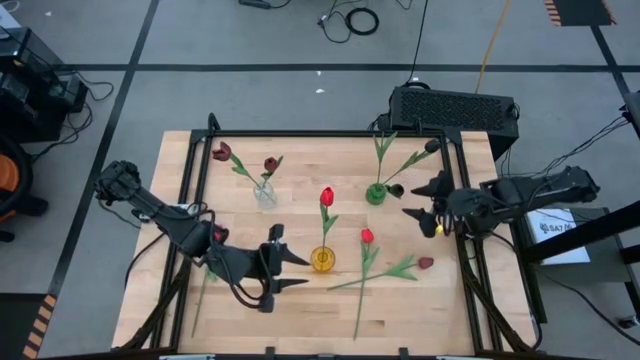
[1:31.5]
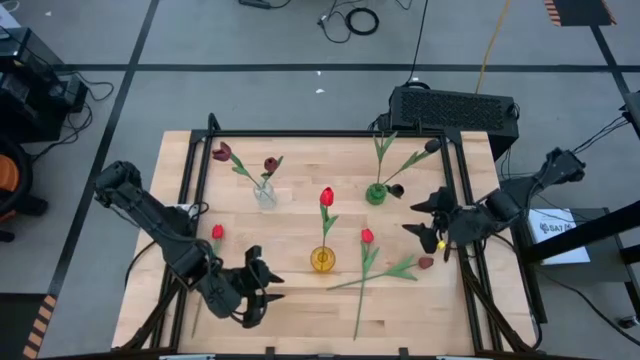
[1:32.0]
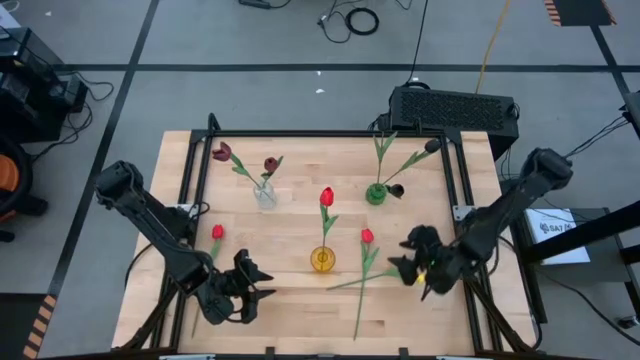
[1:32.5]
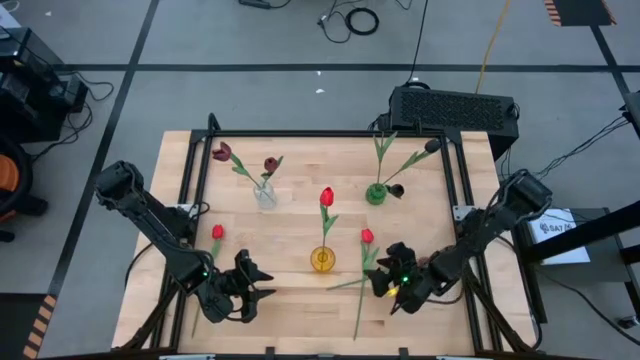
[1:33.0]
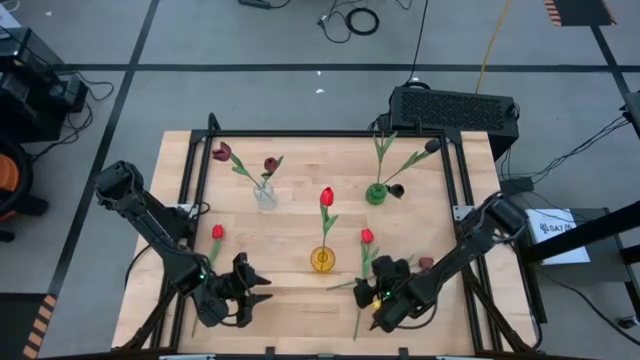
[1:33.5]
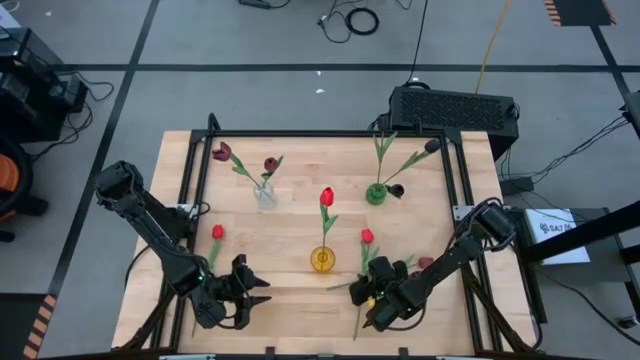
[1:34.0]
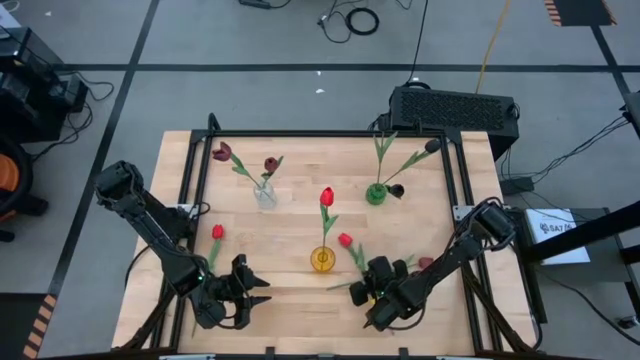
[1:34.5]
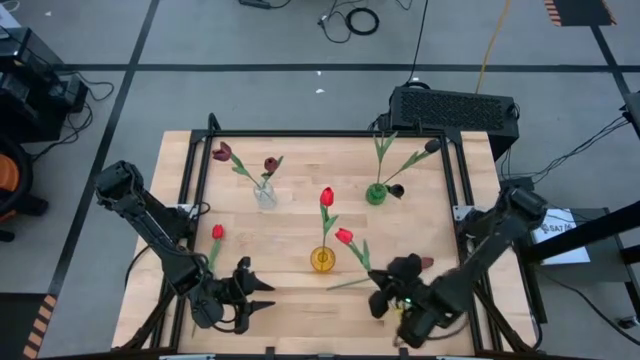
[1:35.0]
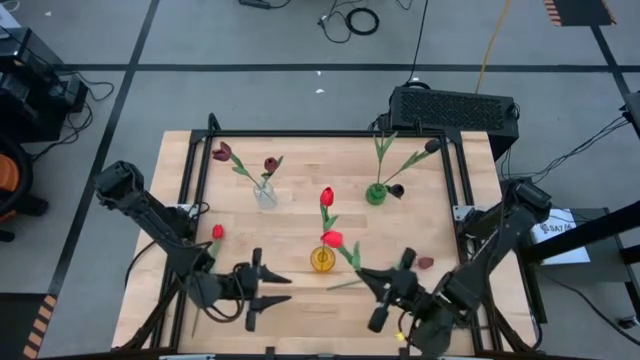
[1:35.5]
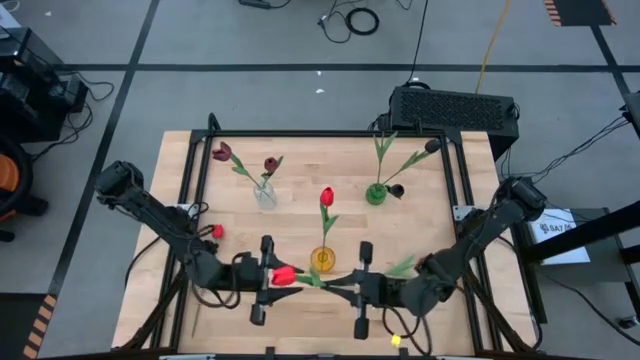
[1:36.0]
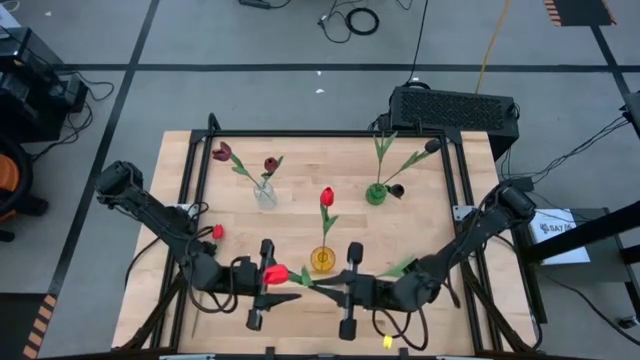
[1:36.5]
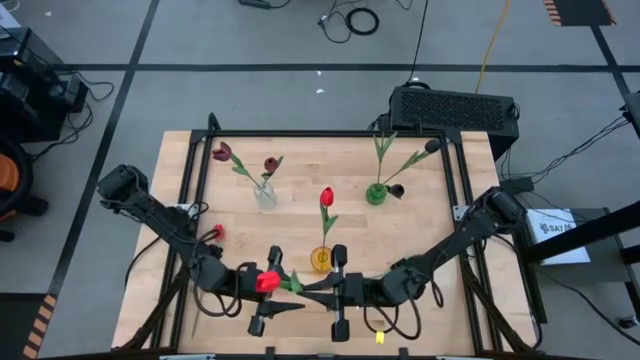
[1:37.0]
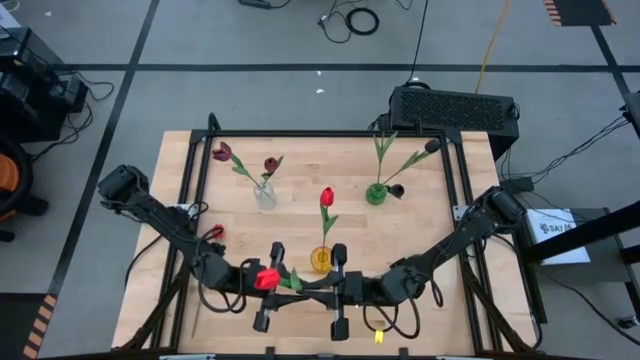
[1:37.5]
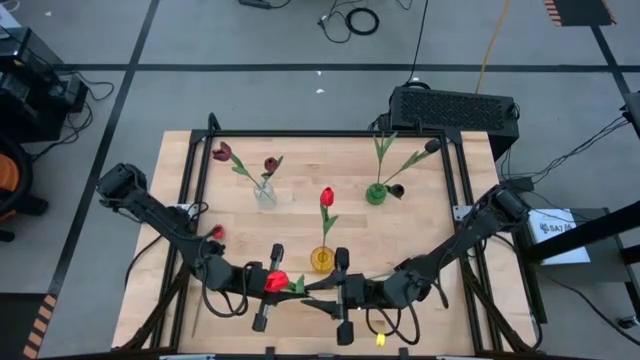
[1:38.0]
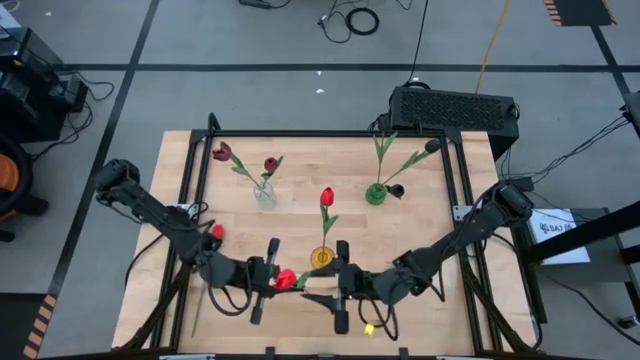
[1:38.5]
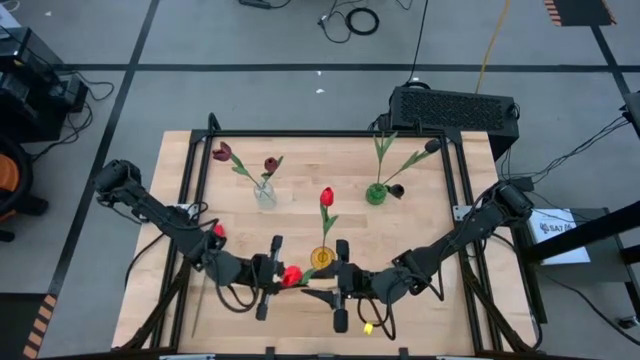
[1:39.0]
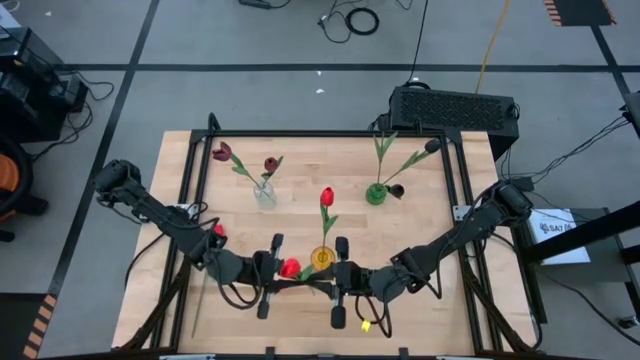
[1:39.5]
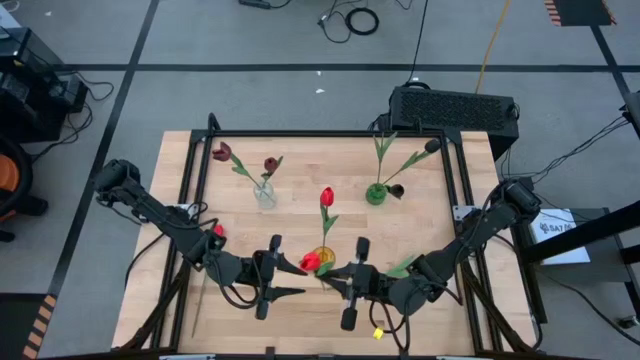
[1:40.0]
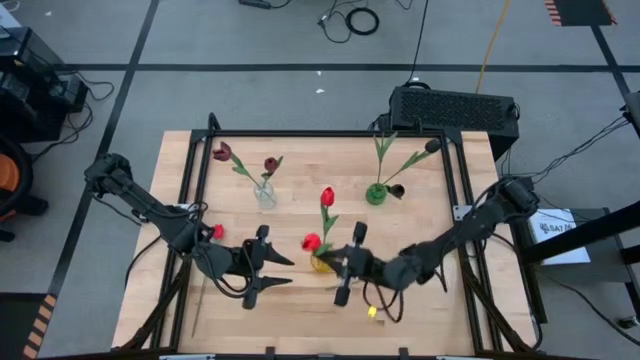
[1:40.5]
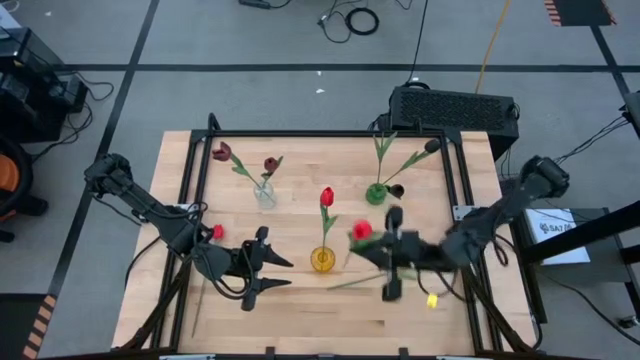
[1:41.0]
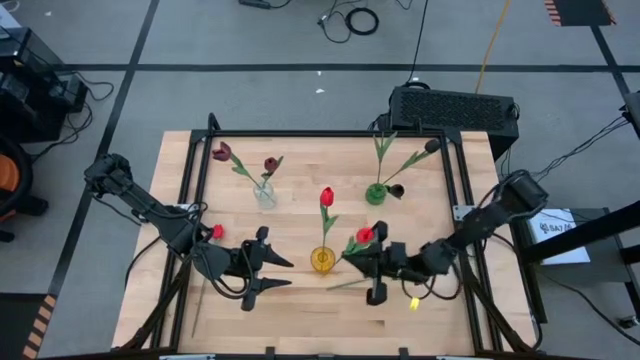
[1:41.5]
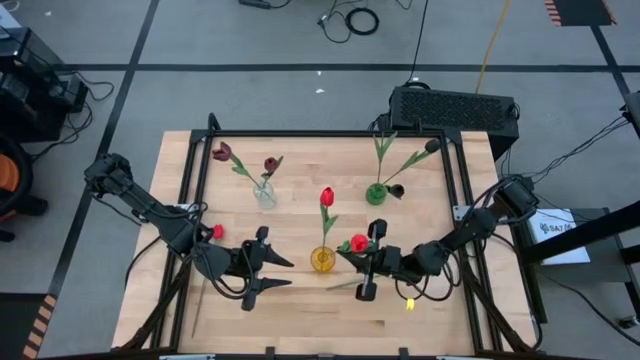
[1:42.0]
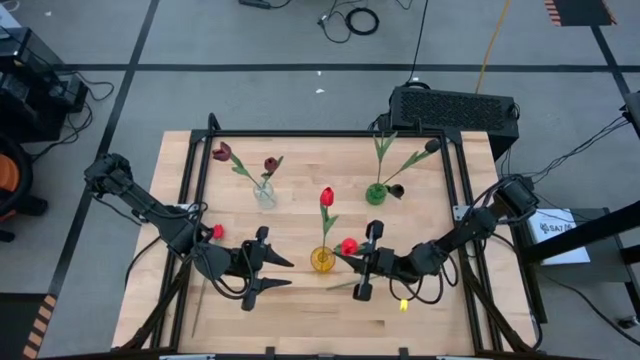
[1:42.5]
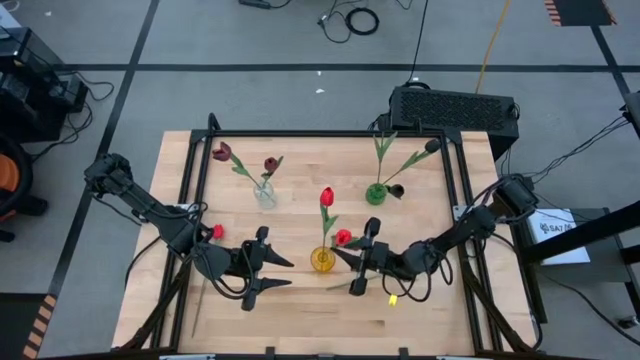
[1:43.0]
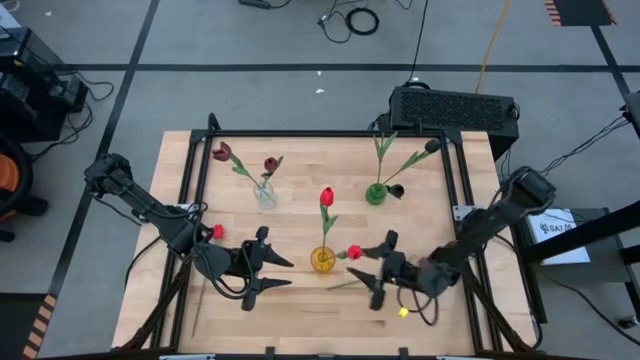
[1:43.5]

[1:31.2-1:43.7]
Task: Sort flowers into vase by color
Put the right red flower into the yellow vase

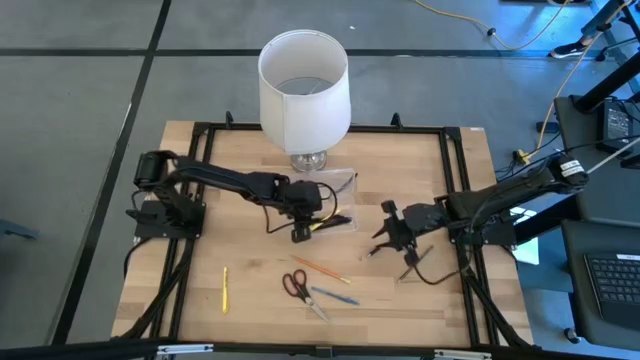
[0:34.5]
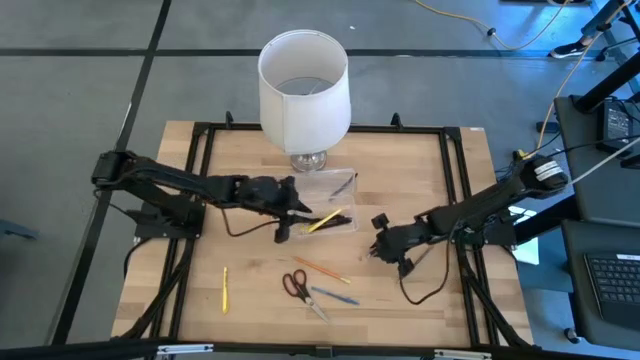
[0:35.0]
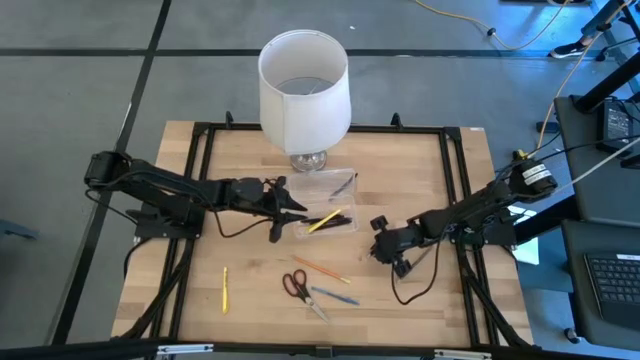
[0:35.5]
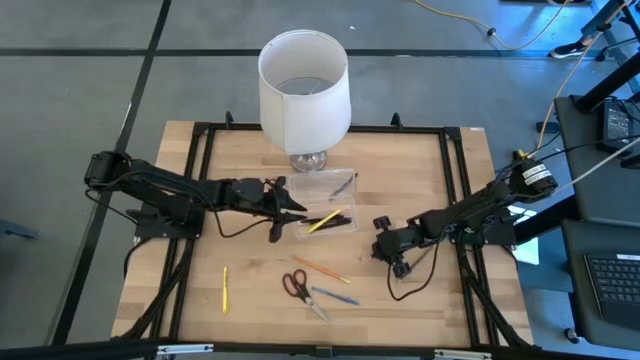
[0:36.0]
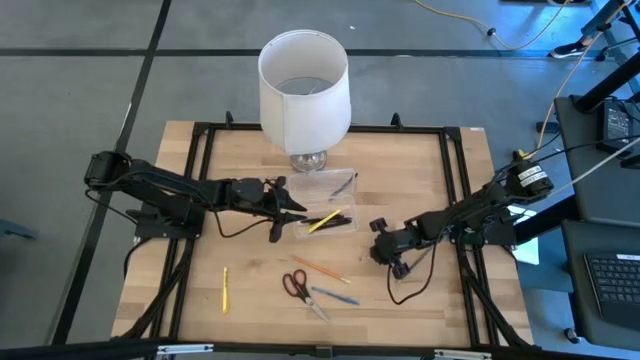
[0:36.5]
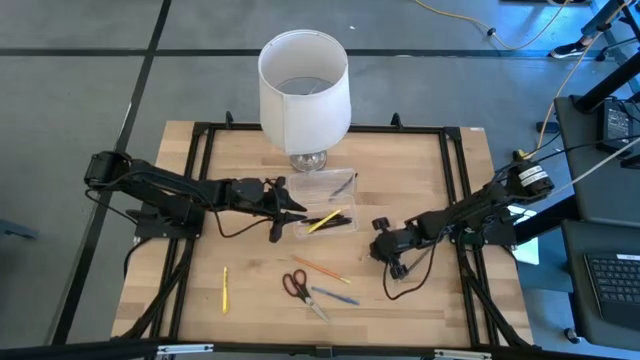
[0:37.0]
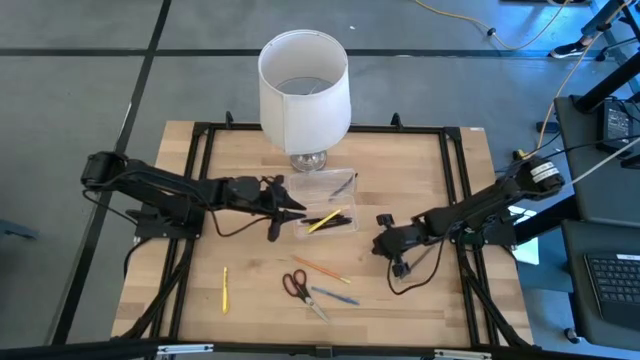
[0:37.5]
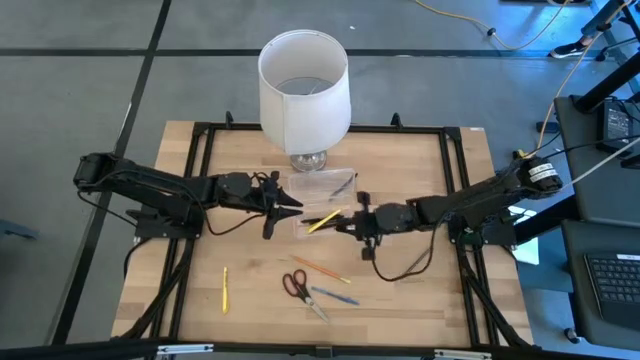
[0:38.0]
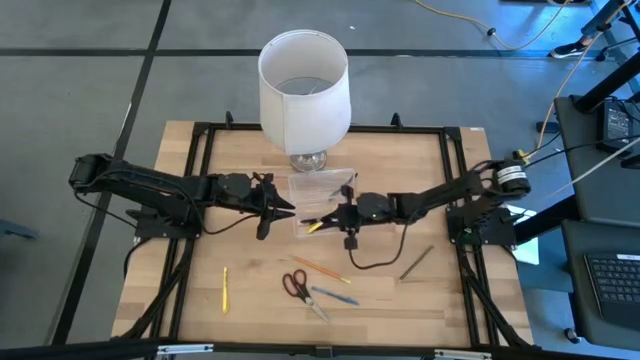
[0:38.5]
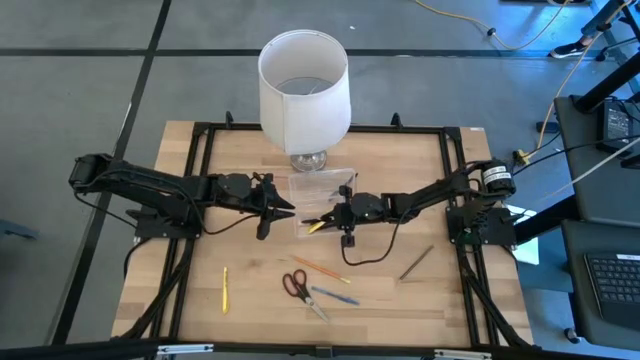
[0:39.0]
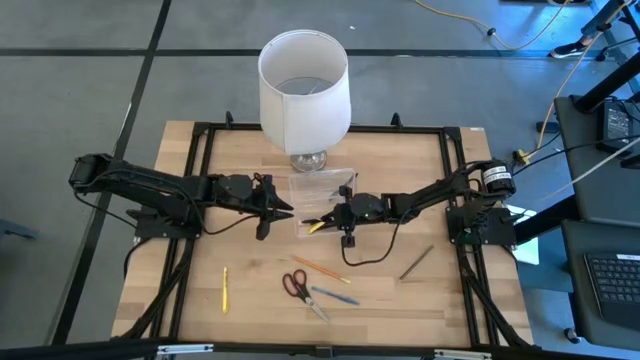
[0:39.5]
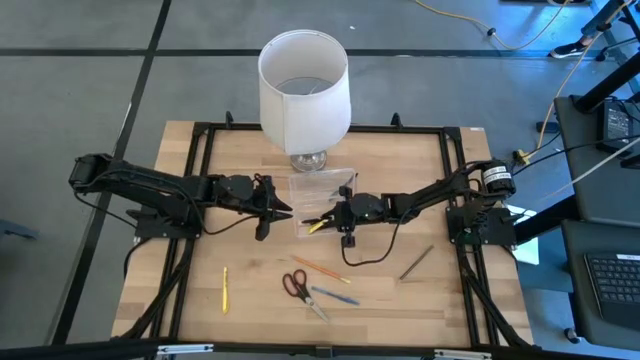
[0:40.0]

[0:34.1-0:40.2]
Task: Pick & place school supplies into a supply box
Put the black pen into the transparent supply box

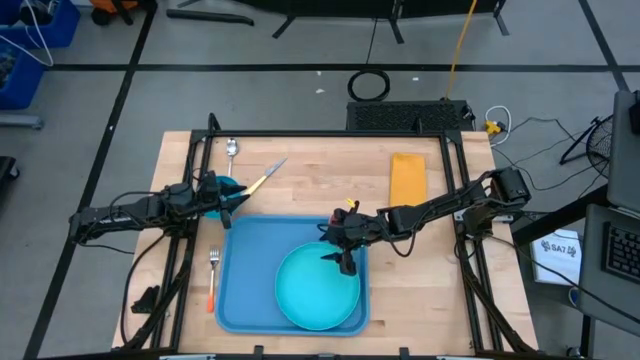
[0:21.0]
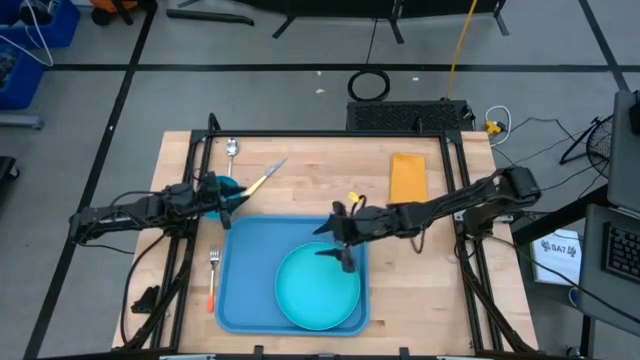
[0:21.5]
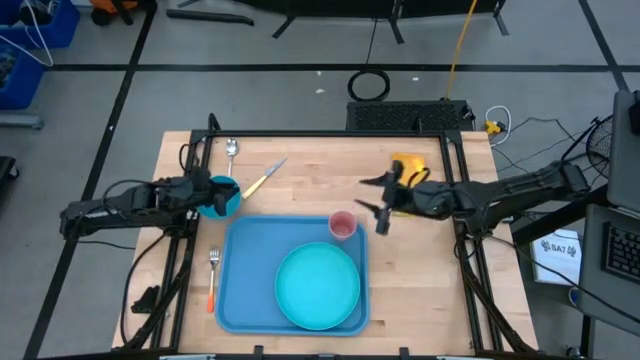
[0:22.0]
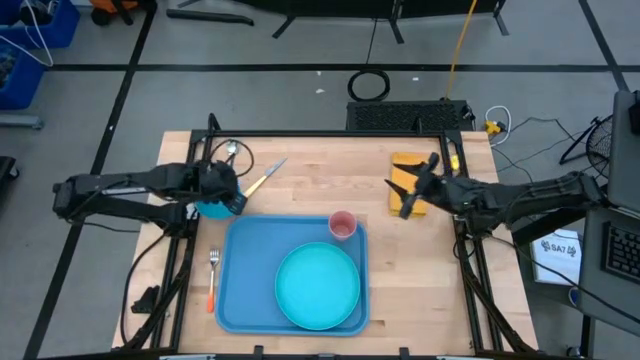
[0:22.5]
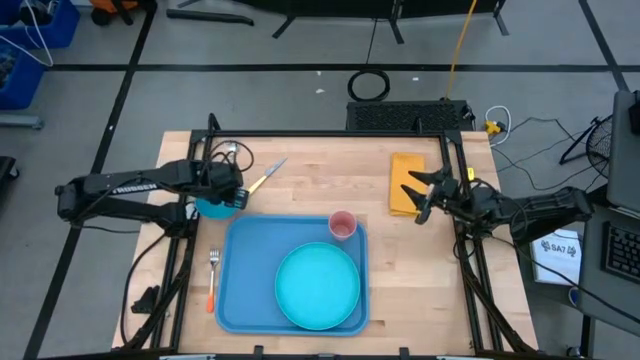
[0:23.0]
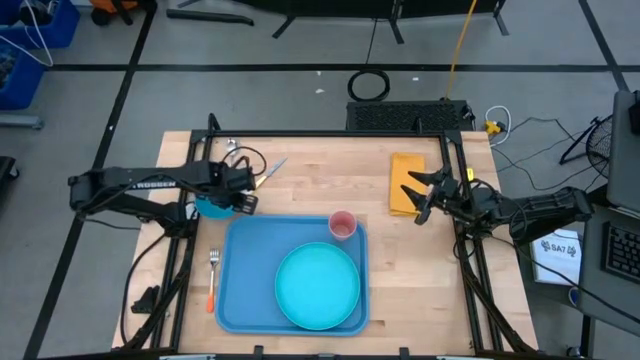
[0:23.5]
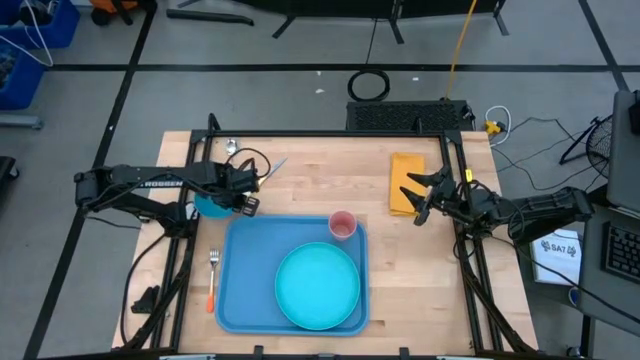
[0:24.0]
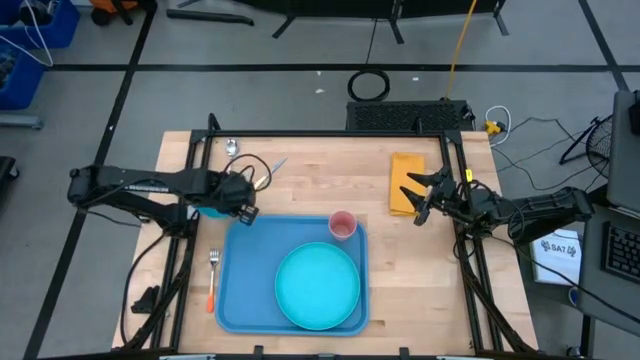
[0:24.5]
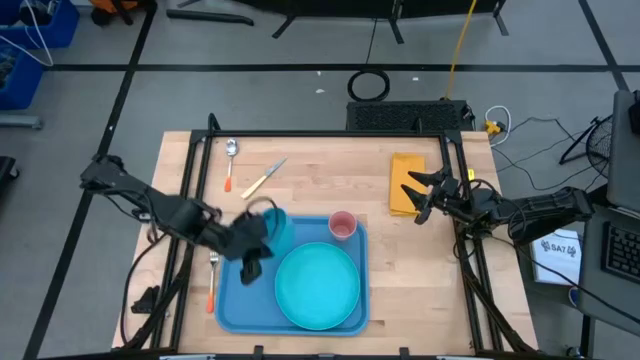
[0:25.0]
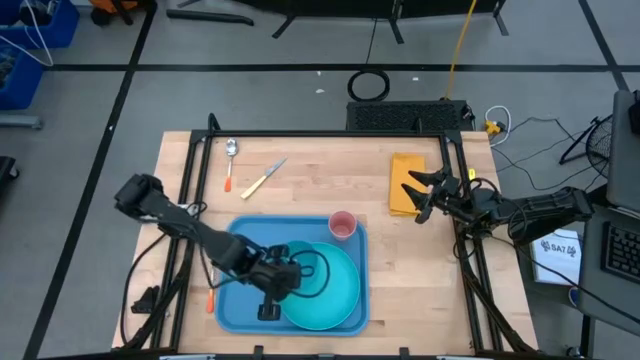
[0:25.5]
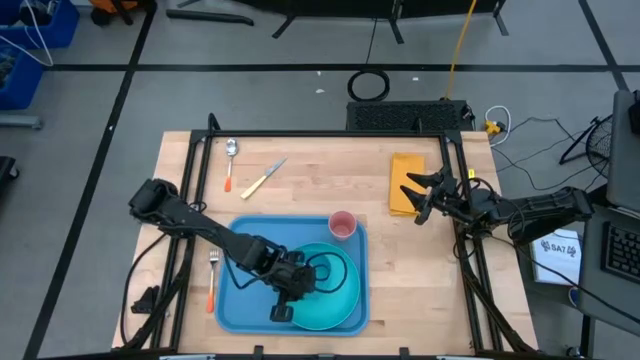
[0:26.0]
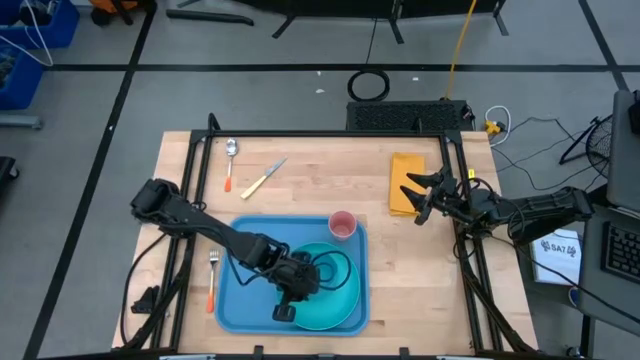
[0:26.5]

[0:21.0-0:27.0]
Task: Set up tray
Put the blue bowl on the light green plate
